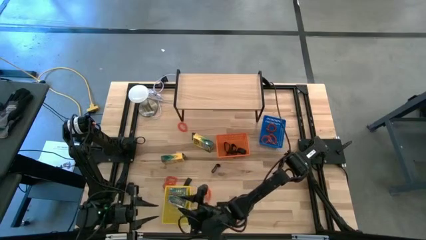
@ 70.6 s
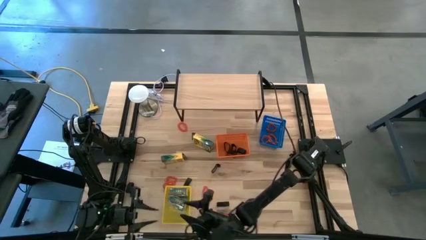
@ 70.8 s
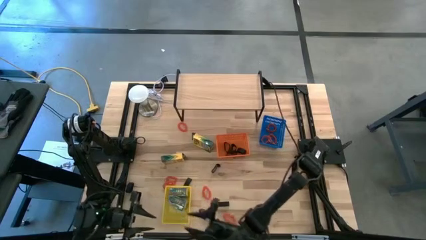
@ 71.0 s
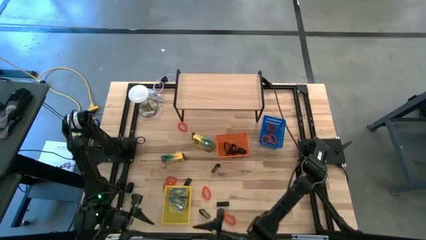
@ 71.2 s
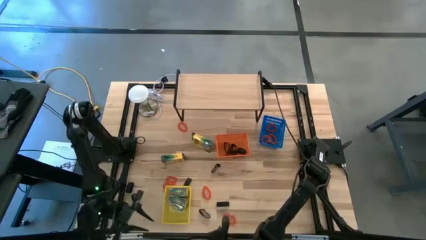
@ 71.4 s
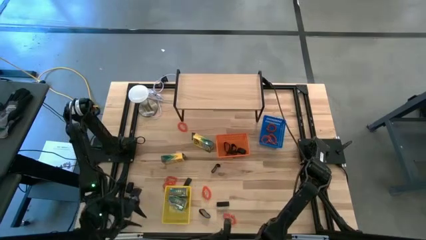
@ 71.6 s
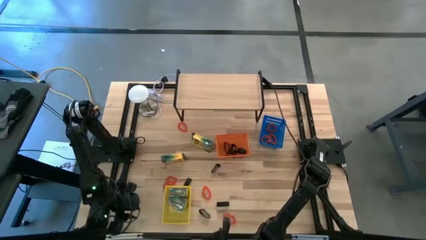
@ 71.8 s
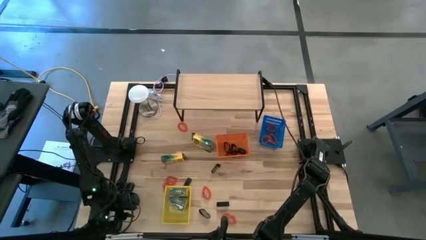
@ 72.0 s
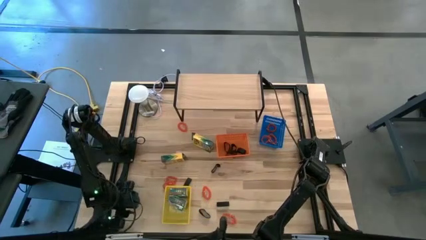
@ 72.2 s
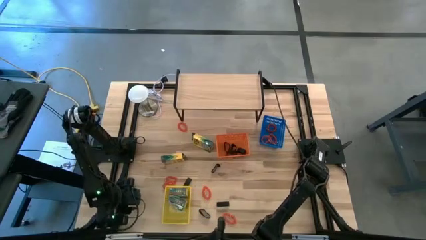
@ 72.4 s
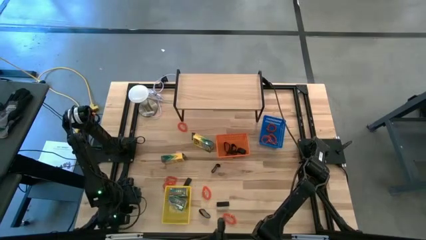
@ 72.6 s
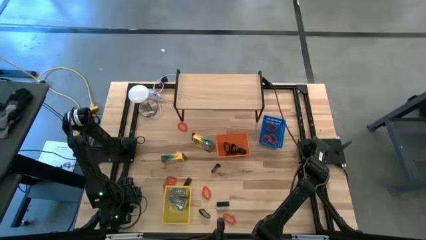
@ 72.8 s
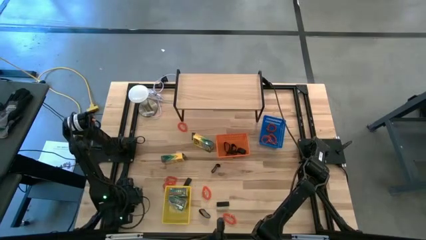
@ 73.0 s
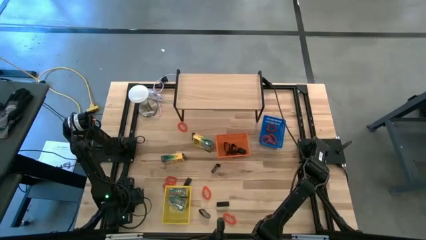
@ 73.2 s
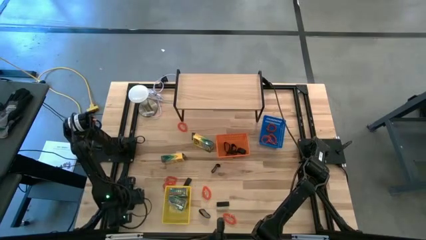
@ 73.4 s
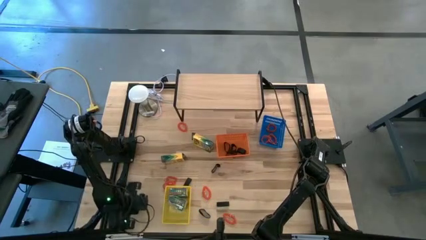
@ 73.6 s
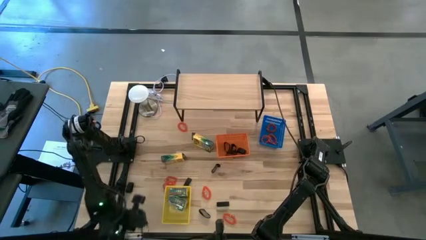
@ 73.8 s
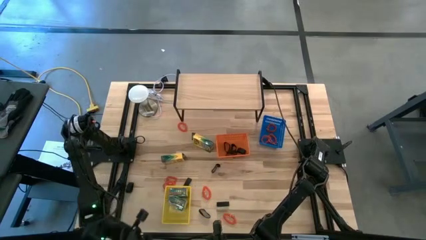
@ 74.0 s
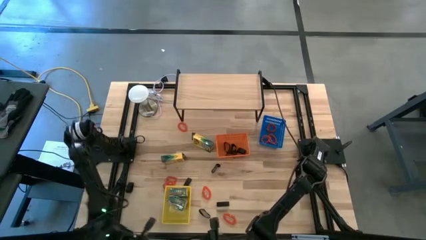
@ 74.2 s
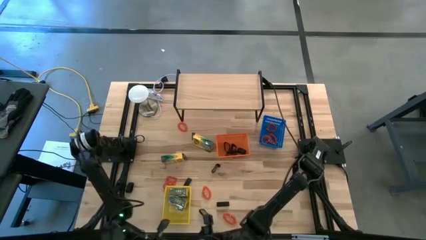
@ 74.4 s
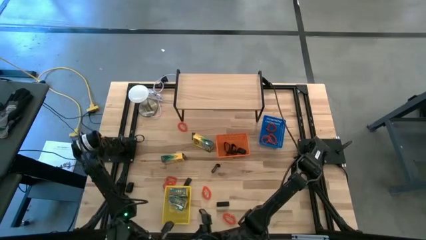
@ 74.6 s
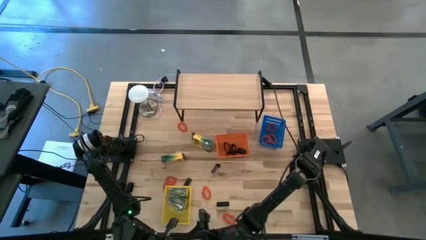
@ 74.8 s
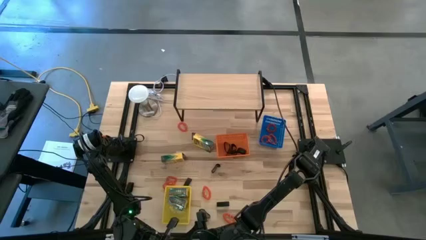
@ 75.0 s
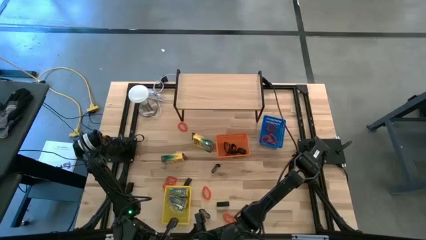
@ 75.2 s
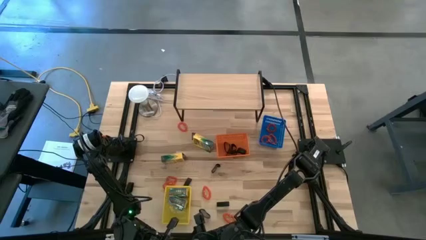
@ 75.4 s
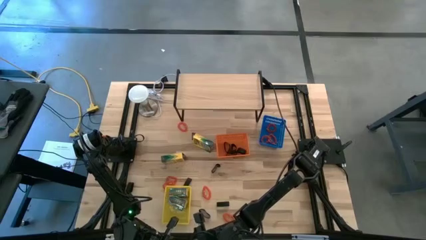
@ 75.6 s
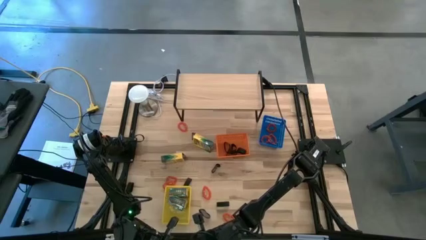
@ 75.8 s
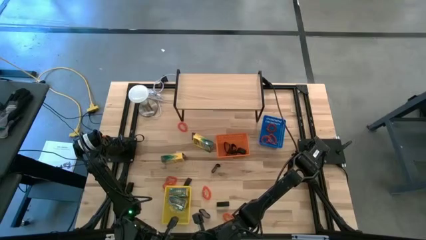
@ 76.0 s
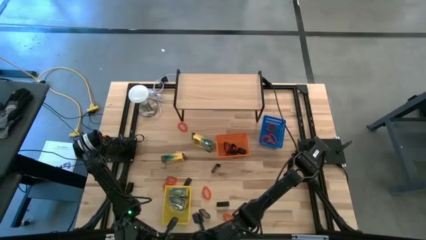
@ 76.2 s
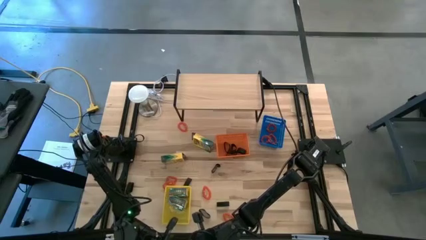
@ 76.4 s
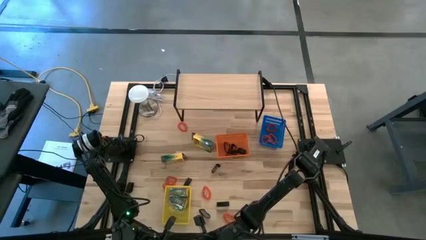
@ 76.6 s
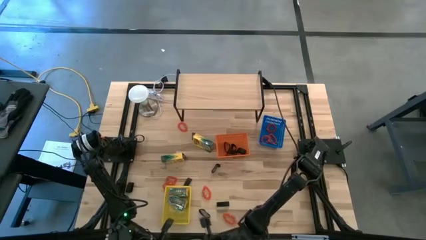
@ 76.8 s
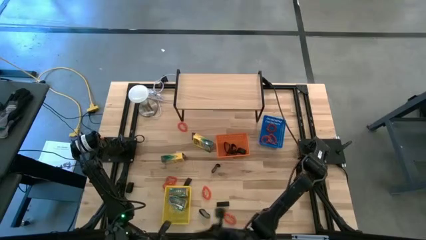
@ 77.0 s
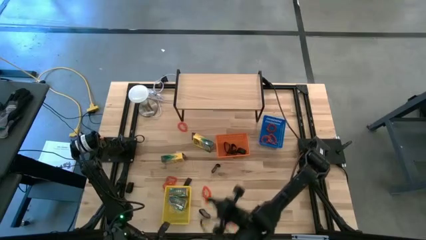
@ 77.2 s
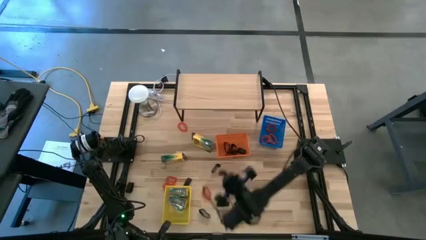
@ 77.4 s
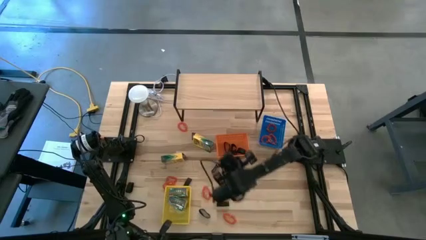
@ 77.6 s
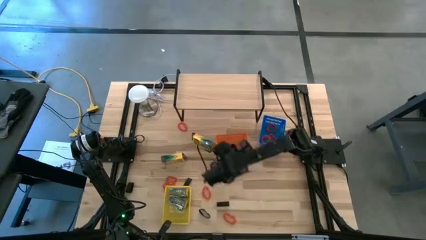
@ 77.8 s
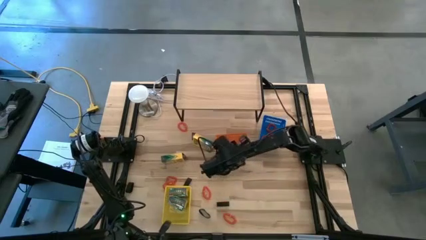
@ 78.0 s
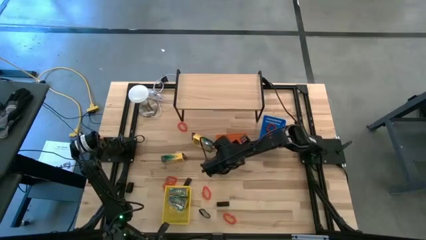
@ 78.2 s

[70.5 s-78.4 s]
Task: Pick & Place Office Desk Supplies
Put the rubberband into the orange bin

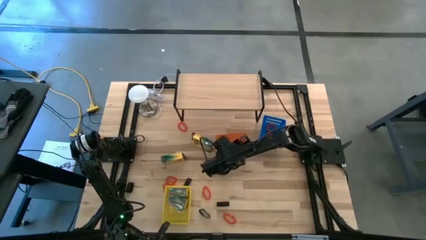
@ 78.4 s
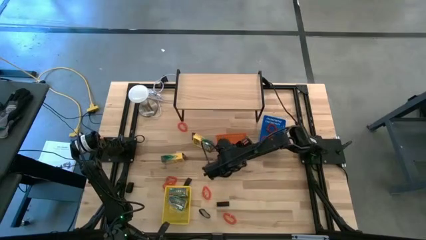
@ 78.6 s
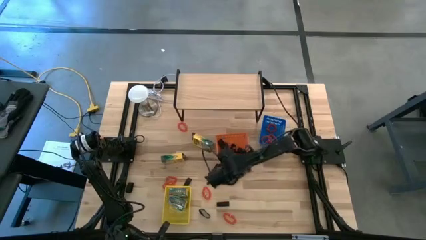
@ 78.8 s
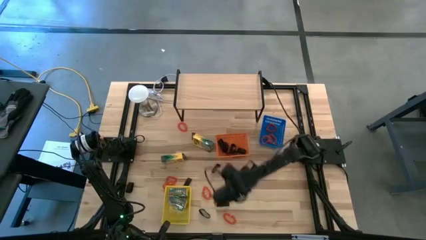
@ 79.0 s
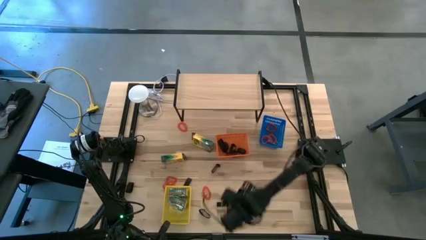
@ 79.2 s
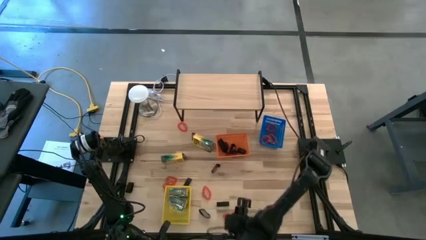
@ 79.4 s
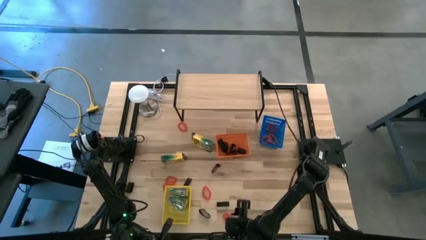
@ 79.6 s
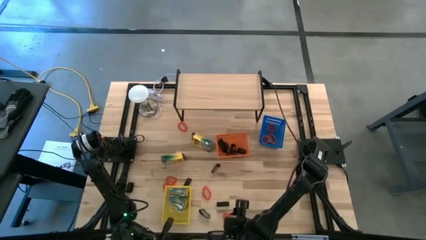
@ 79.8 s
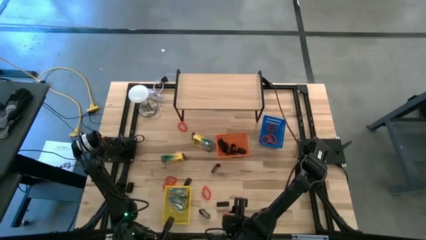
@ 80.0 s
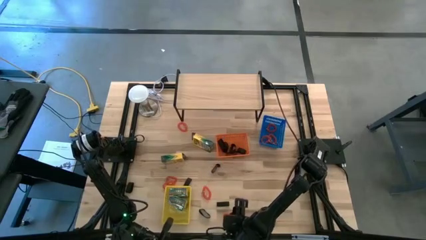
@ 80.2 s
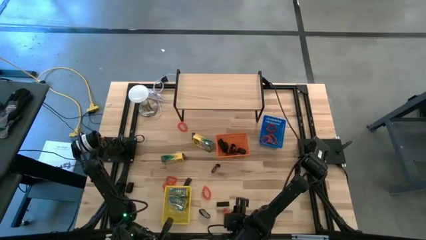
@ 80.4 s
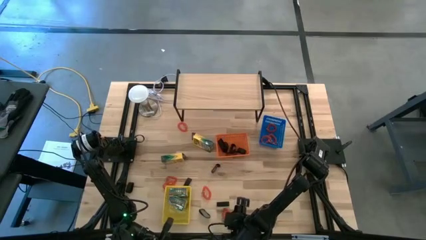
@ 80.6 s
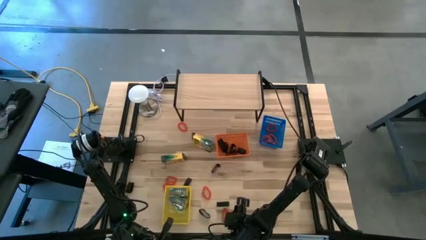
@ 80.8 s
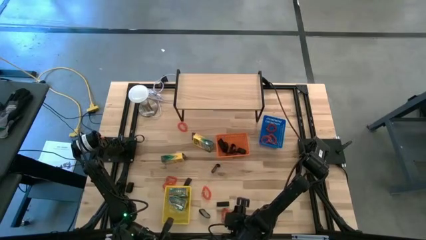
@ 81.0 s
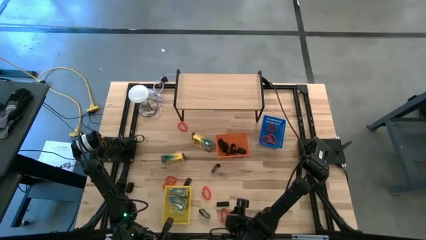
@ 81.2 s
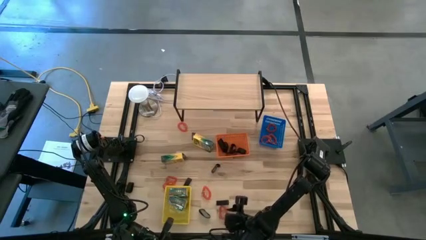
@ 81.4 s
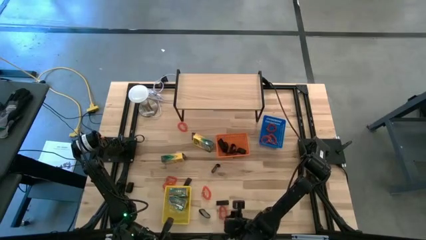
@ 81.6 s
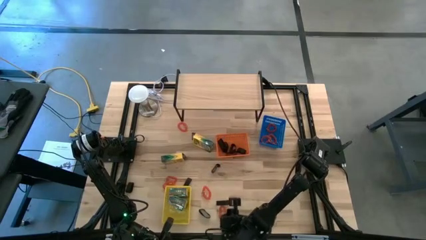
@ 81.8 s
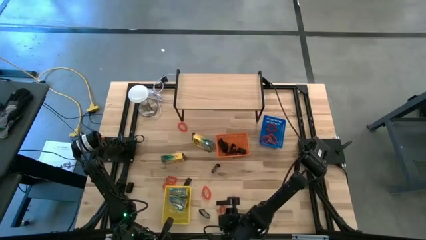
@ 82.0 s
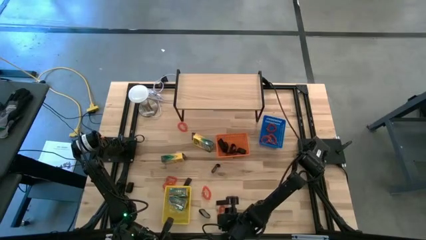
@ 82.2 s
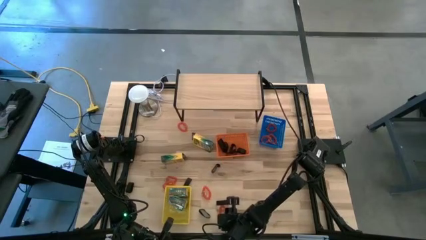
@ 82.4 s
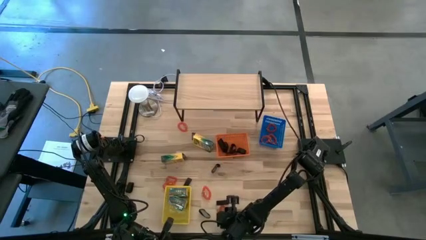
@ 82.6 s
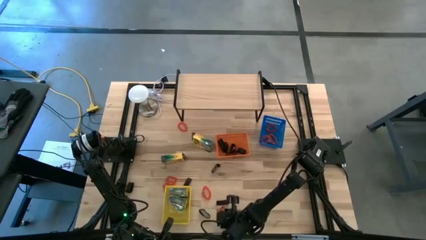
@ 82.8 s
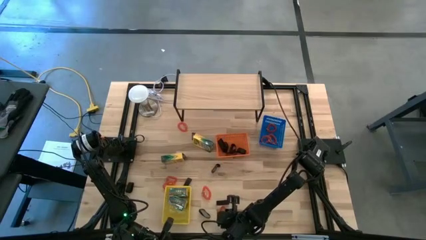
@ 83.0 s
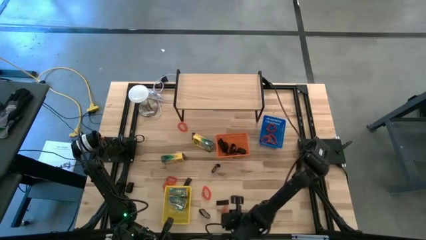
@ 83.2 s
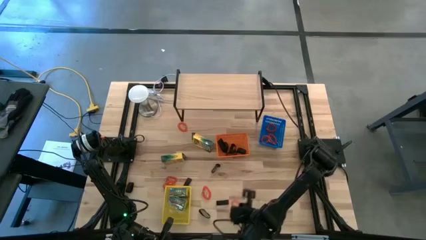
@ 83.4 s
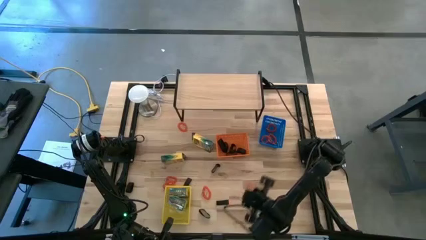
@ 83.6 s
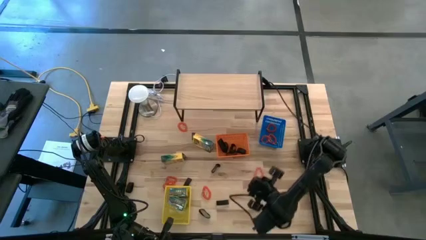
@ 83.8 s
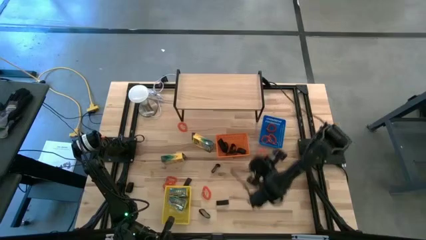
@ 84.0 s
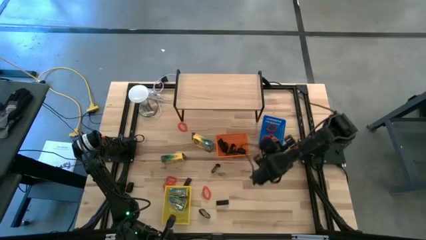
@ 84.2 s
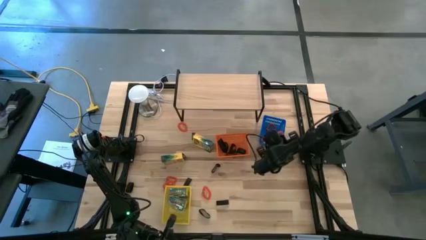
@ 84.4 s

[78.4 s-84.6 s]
Put the spring keychain into the blue bin

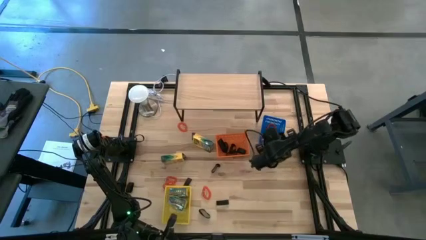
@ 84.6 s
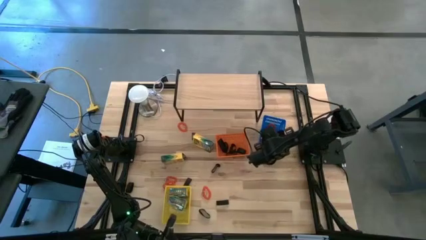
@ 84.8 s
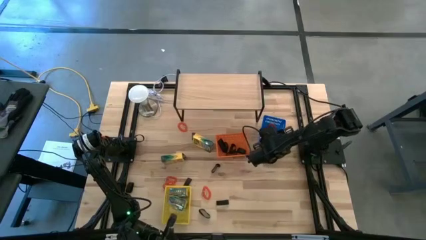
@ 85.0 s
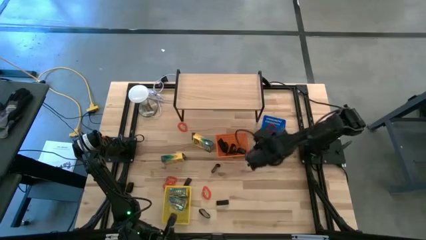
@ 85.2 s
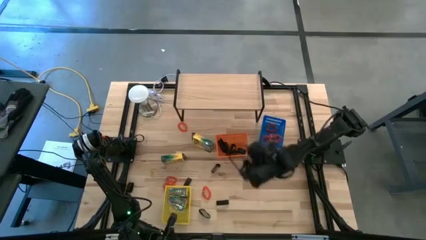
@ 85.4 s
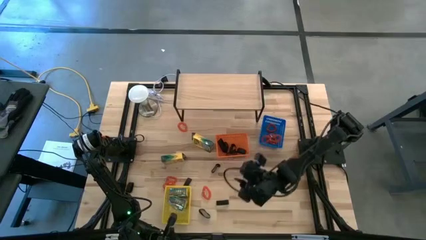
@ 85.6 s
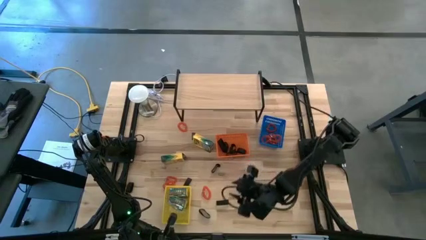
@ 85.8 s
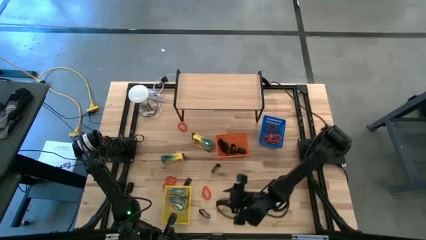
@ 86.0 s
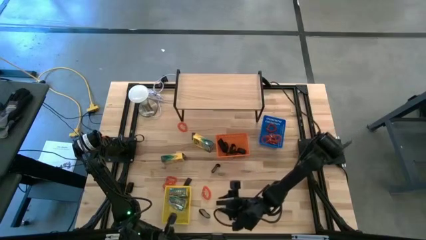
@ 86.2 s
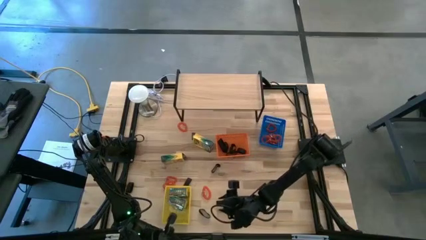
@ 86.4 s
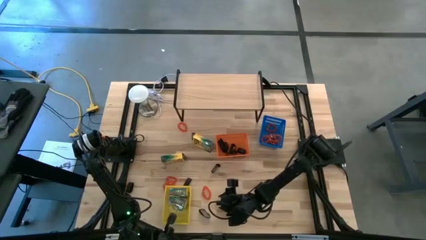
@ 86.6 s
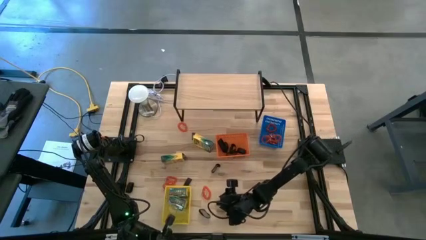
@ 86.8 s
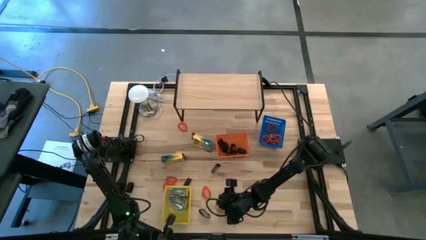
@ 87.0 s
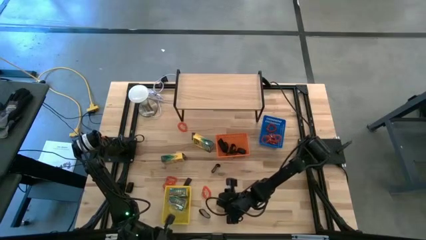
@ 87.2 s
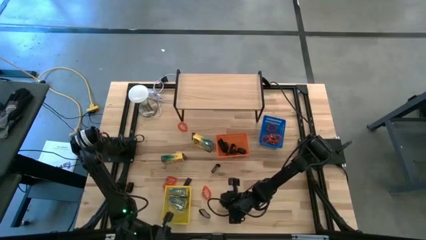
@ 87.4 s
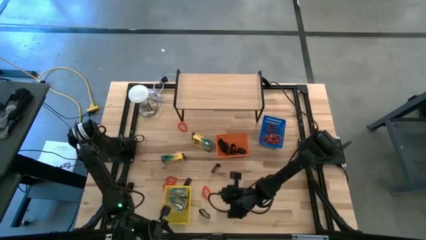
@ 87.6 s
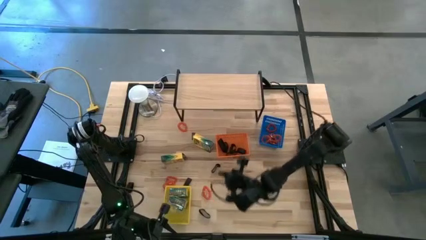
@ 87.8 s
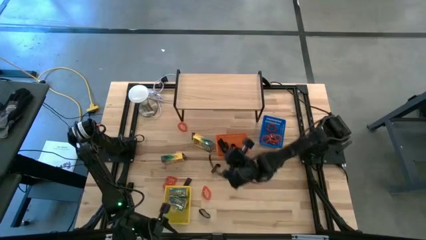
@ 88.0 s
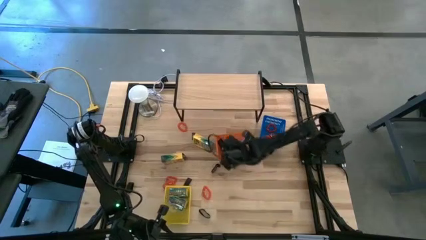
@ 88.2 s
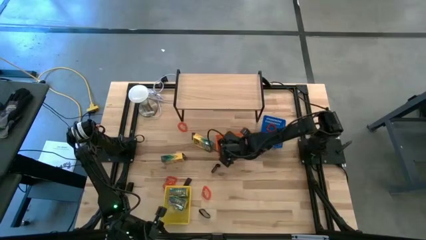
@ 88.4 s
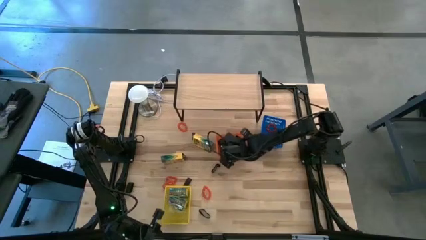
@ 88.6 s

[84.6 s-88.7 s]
Put the rubberband into the orange bin
